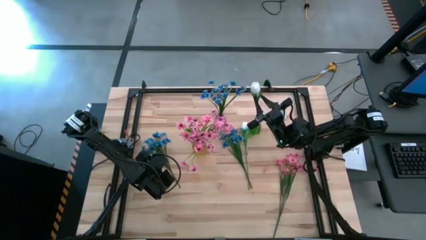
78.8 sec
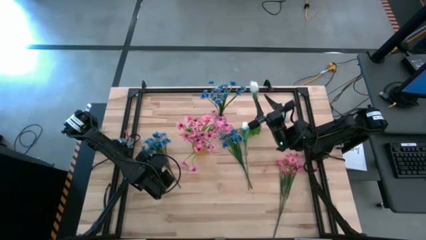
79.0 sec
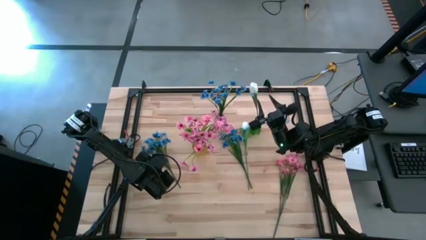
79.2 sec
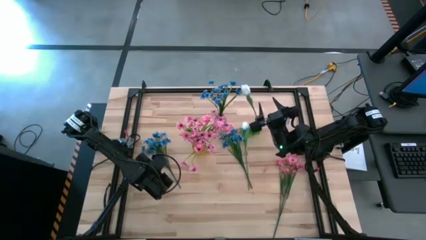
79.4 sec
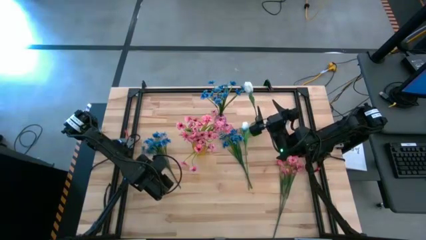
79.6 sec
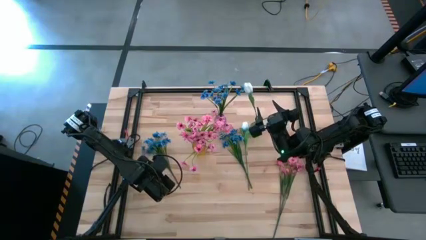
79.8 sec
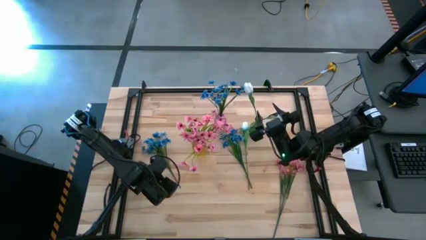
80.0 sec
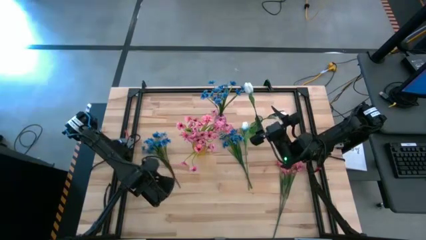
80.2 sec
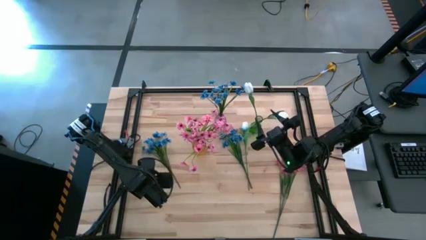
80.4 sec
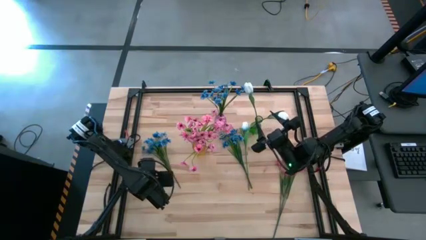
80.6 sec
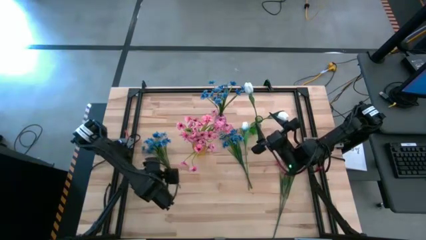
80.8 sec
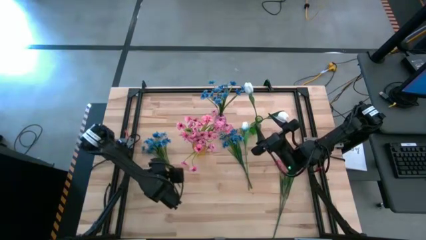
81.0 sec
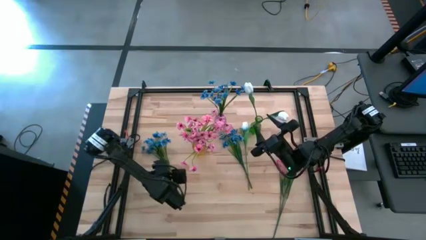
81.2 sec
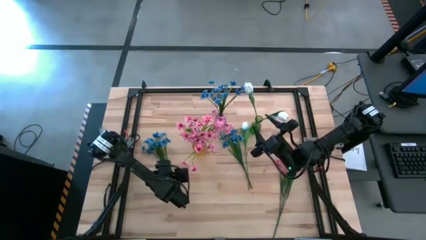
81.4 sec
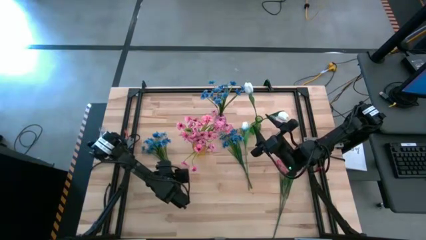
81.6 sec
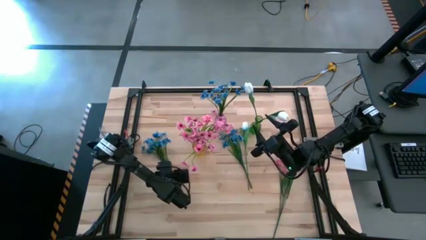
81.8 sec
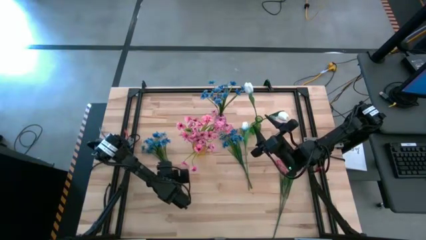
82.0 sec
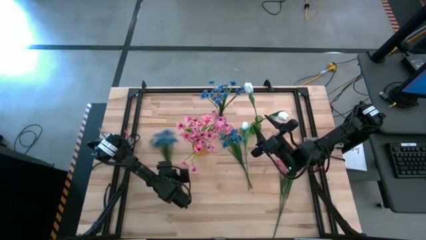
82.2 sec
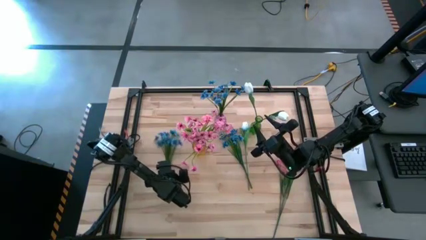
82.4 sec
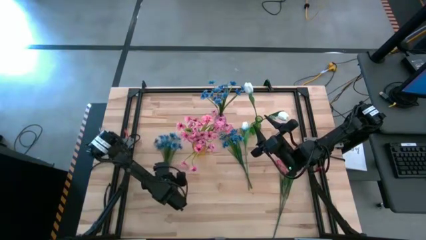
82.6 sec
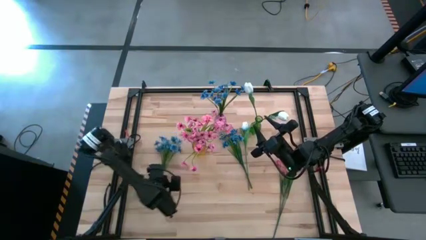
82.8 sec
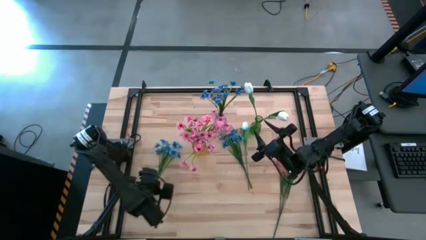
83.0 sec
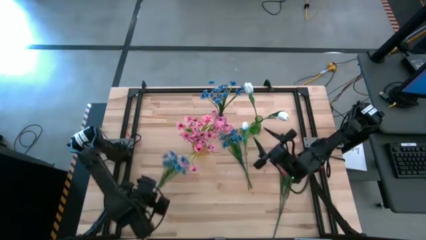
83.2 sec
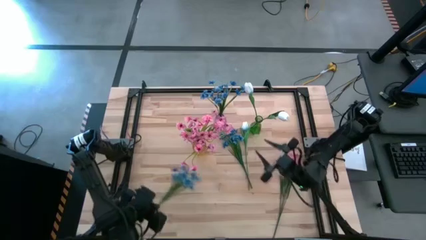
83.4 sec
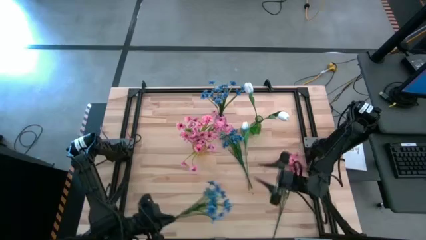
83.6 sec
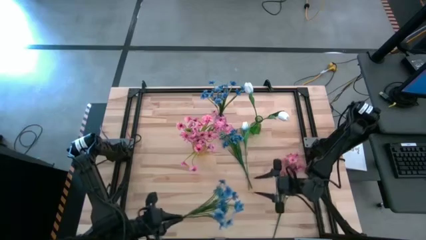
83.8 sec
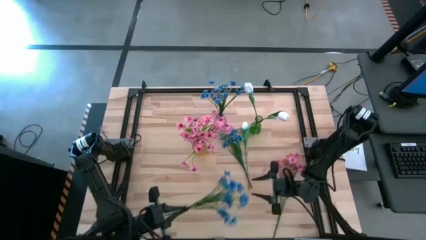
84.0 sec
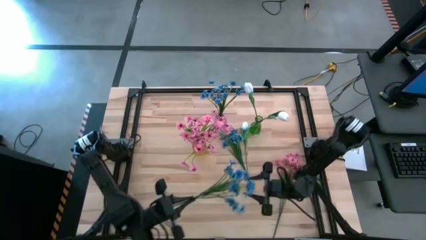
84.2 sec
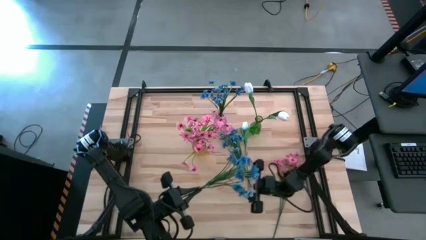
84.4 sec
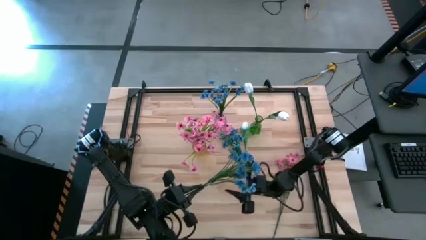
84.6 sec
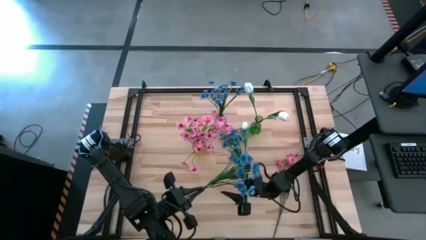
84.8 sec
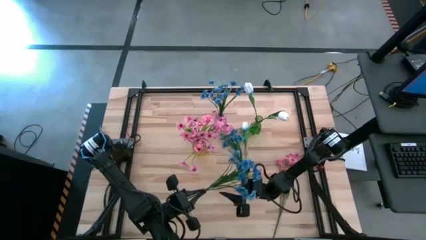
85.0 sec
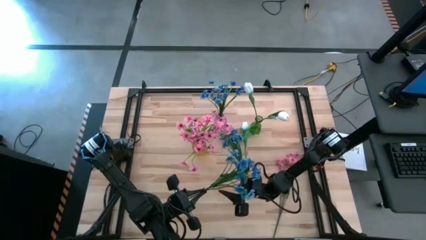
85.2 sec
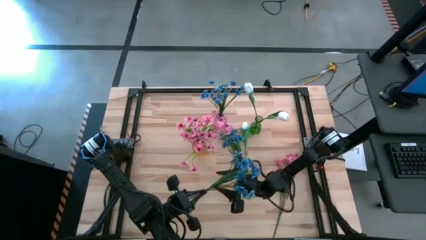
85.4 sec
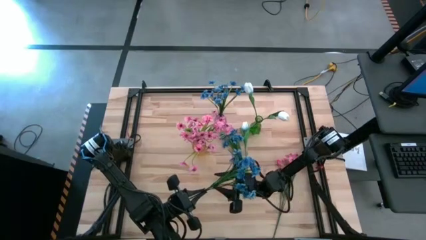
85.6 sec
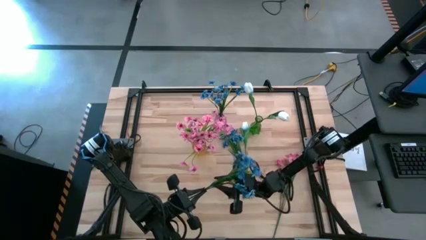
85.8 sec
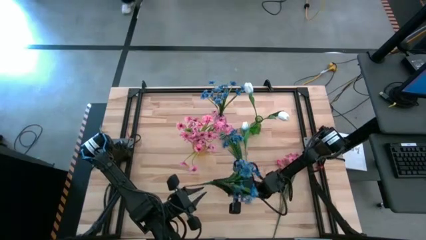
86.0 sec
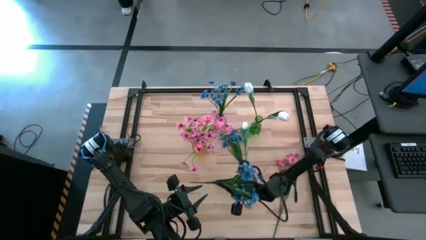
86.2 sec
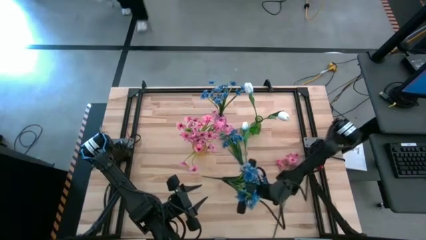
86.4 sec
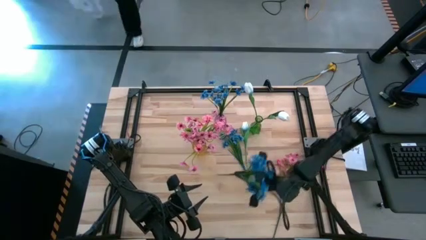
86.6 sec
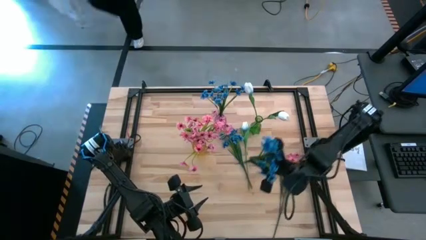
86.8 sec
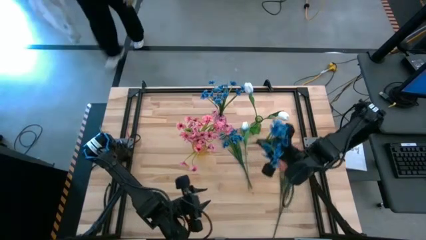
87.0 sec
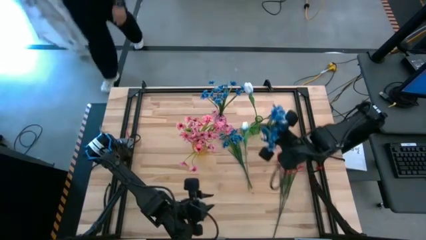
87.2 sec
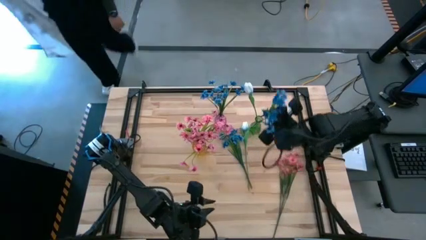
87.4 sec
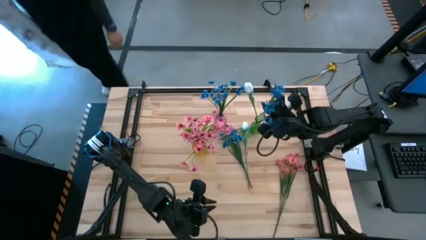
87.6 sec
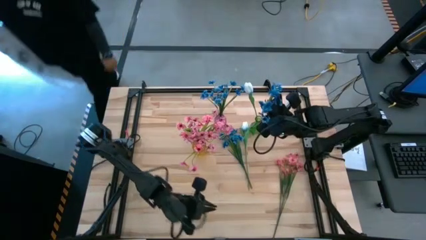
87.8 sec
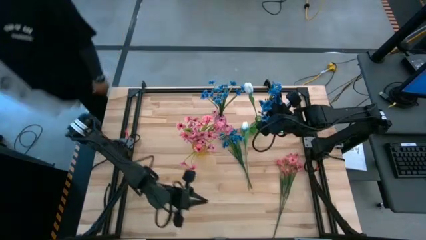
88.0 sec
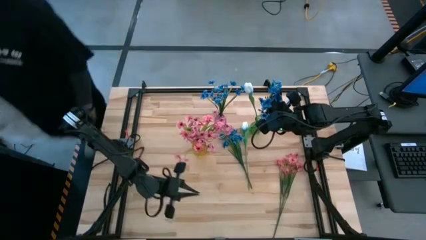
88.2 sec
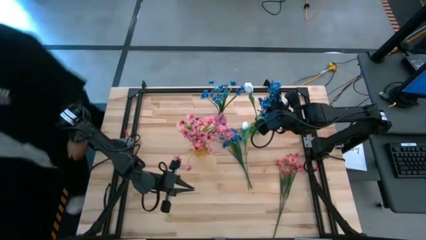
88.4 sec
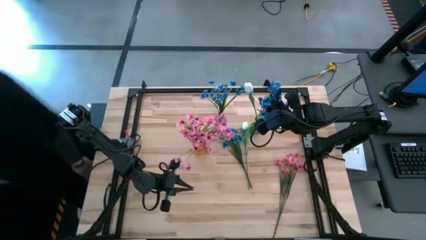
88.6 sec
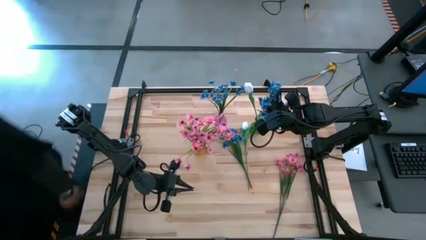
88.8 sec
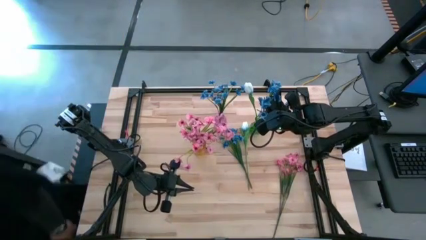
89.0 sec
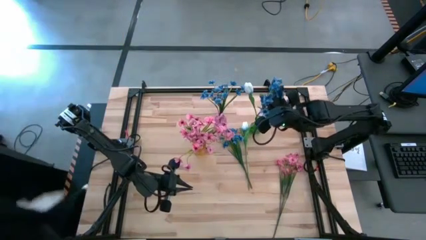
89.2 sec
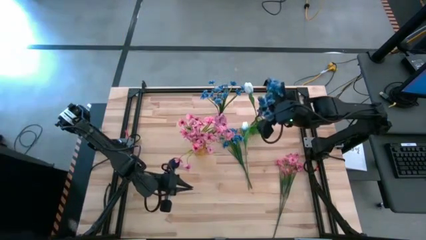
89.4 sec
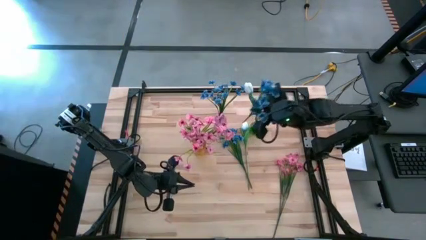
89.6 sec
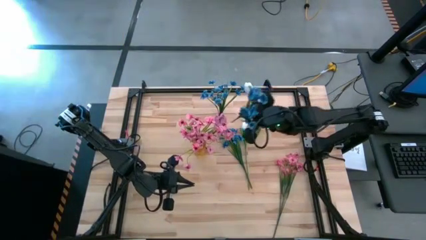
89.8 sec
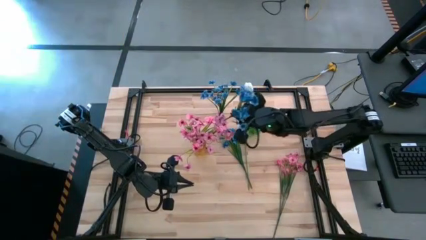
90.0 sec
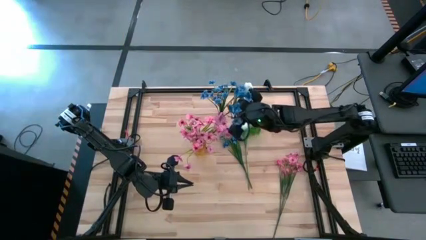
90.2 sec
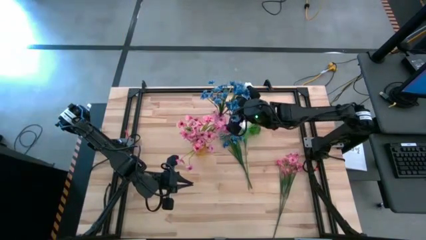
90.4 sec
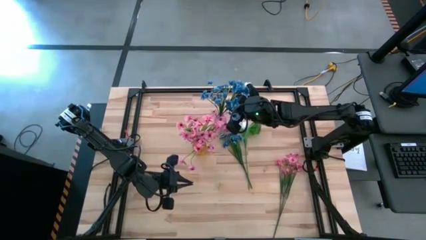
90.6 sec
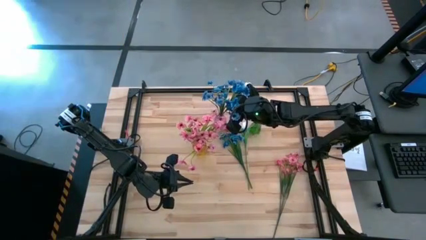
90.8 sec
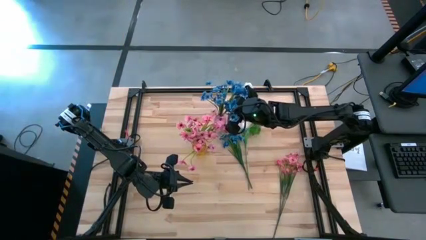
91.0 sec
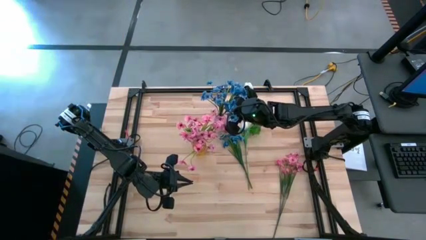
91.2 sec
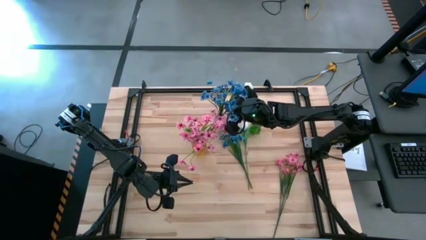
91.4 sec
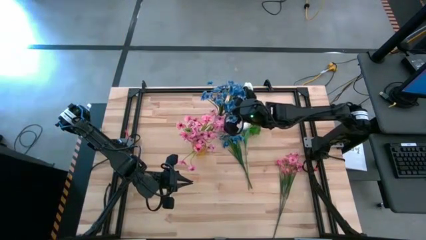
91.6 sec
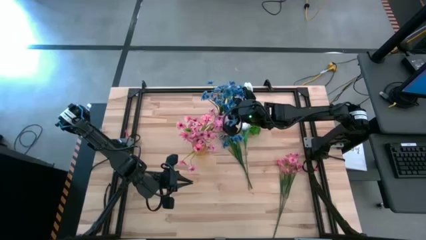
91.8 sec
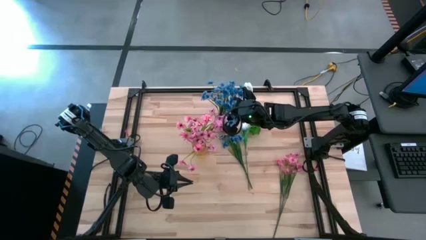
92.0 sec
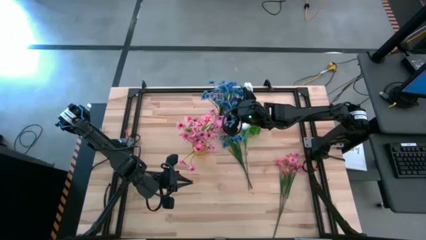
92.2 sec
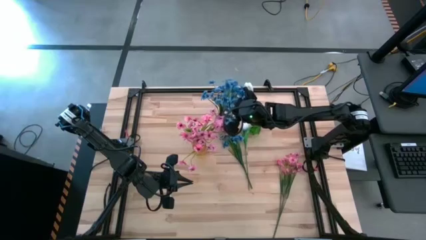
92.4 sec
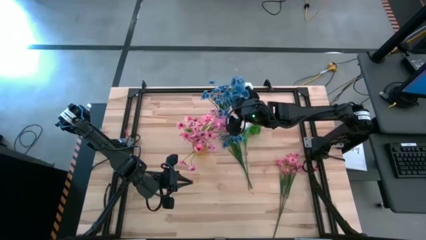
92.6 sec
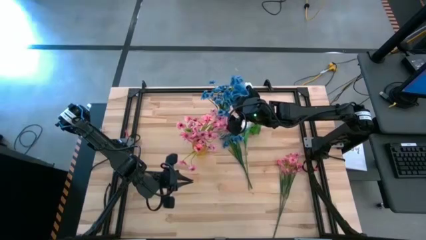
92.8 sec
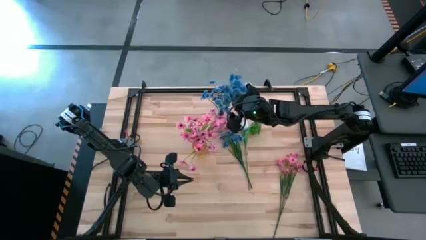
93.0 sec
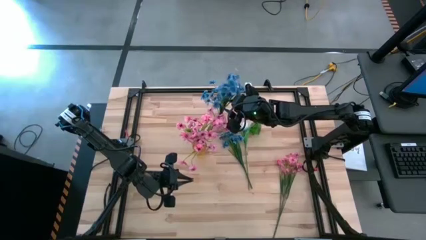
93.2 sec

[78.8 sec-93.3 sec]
Task: Sort flowers into vase by color
Put the left blue flowers into the purple flower vase
